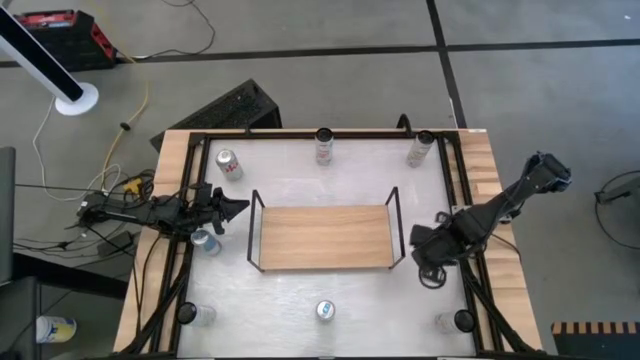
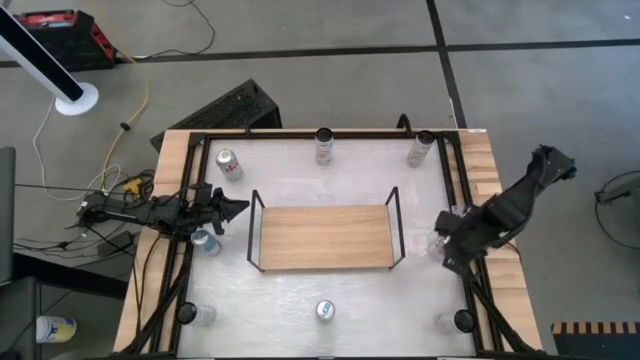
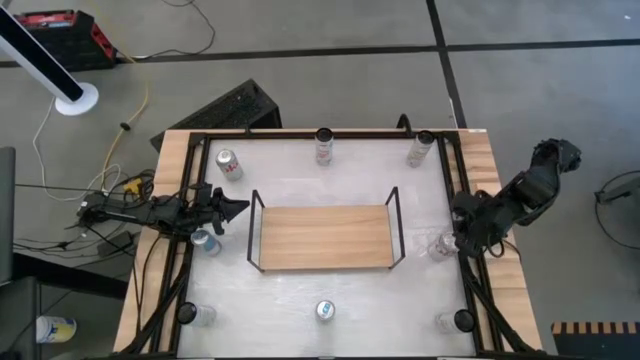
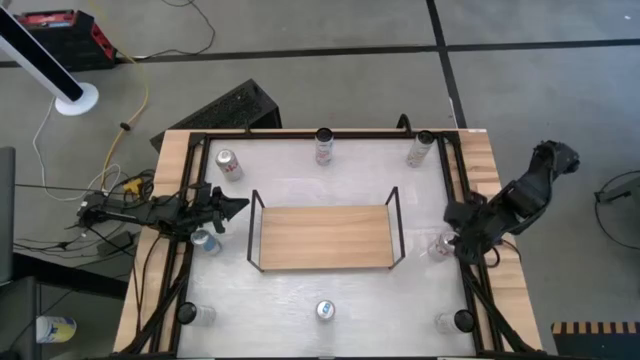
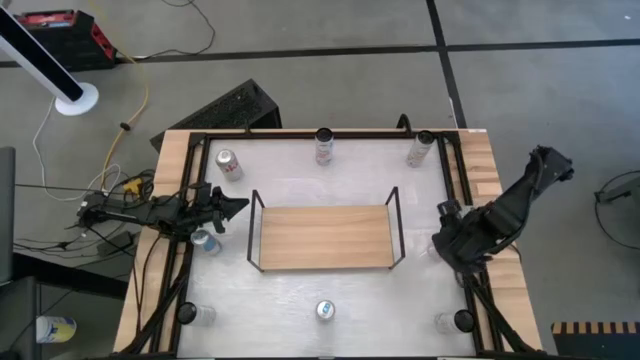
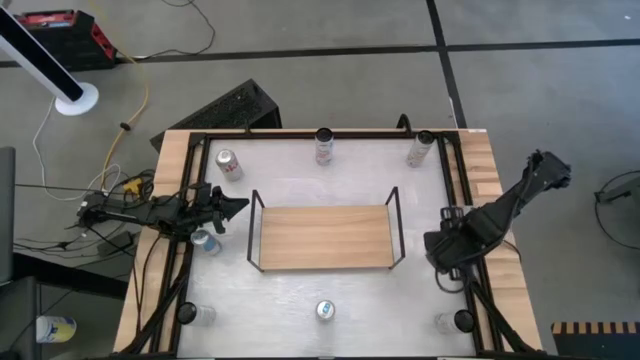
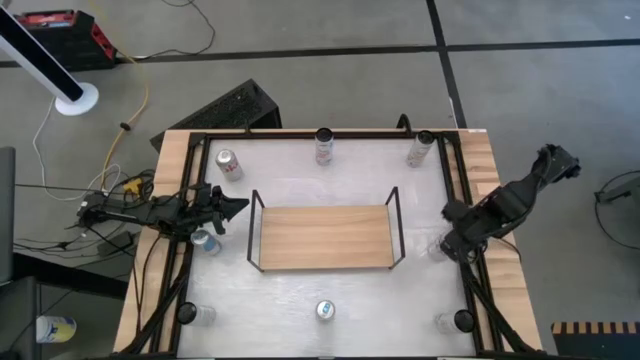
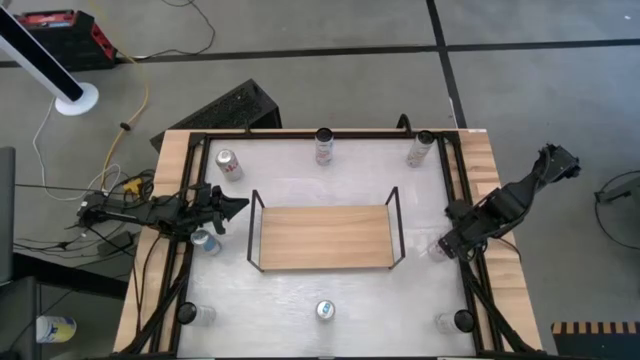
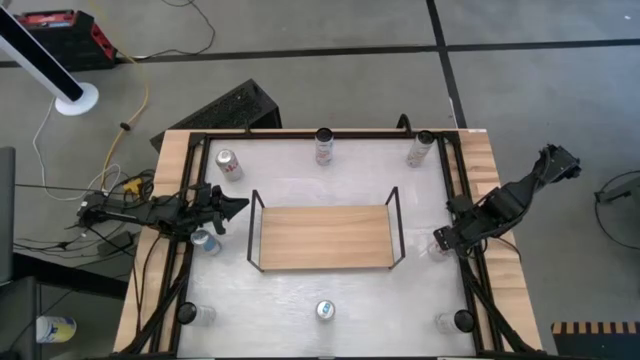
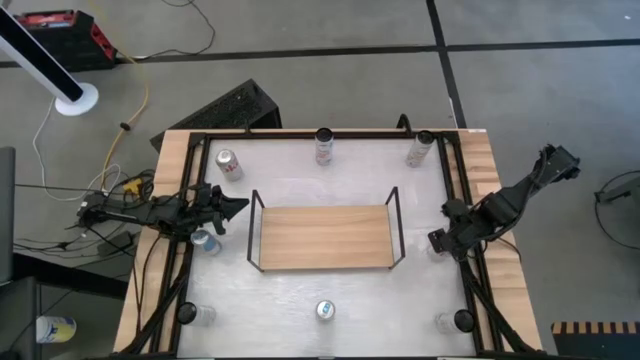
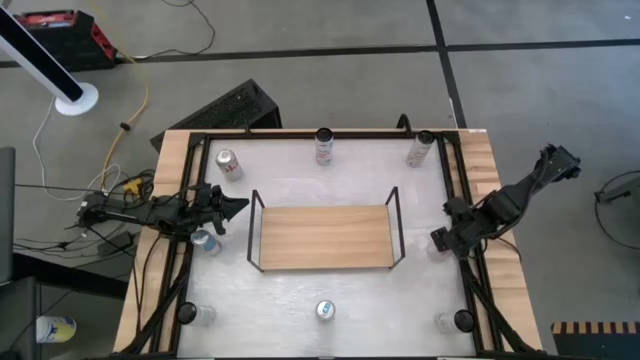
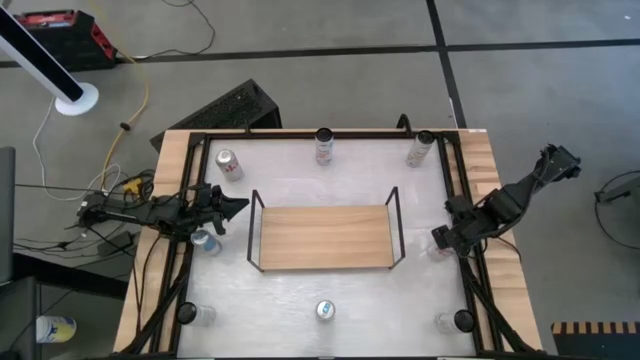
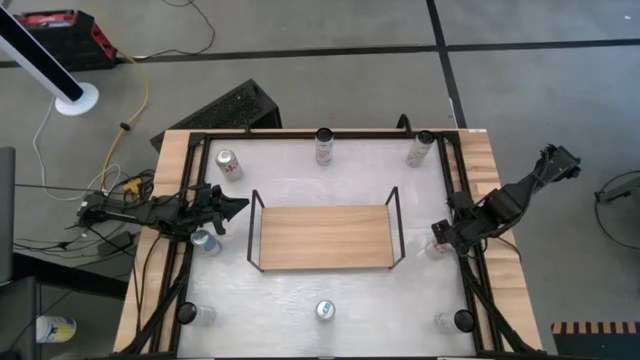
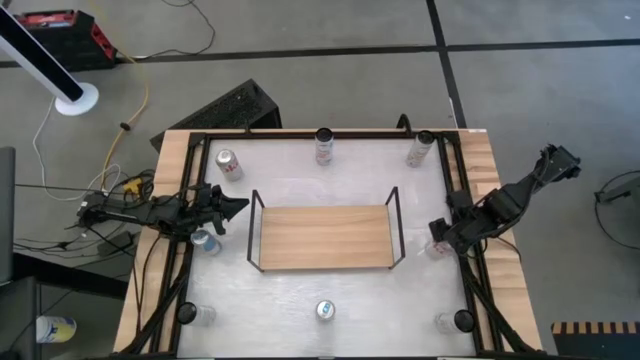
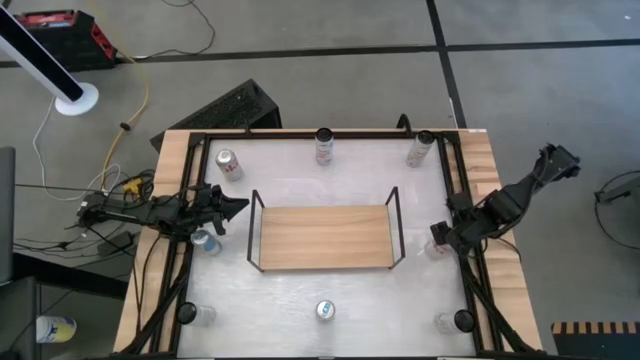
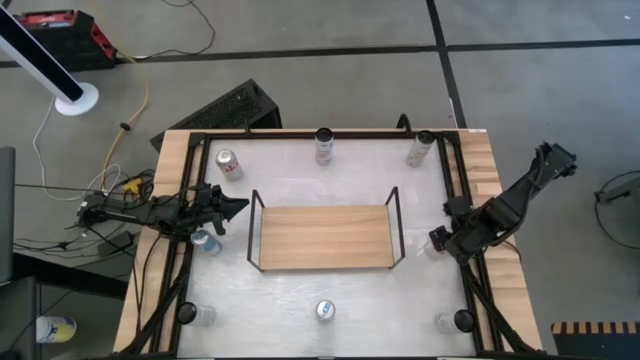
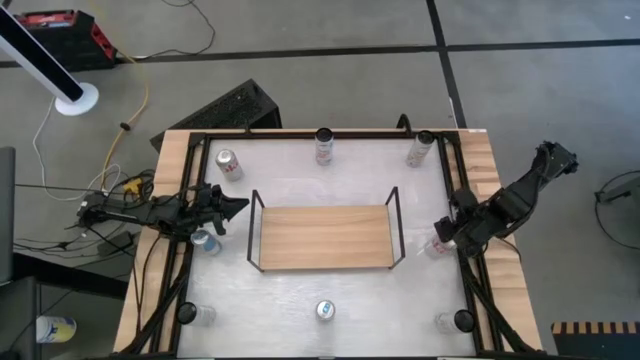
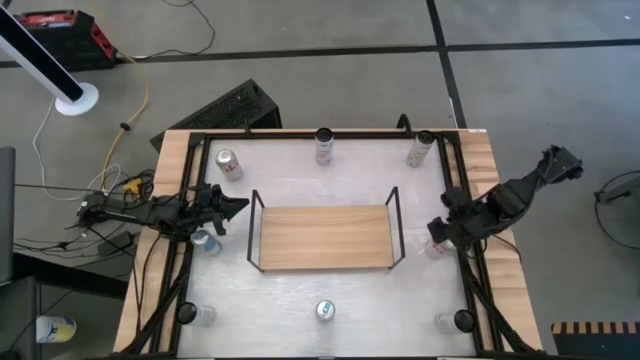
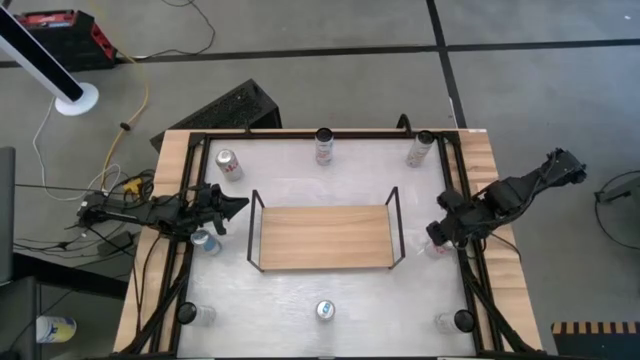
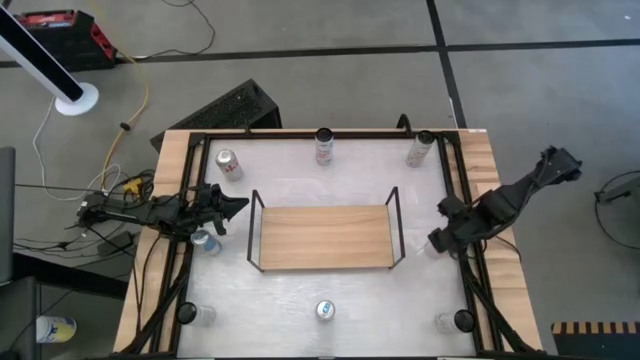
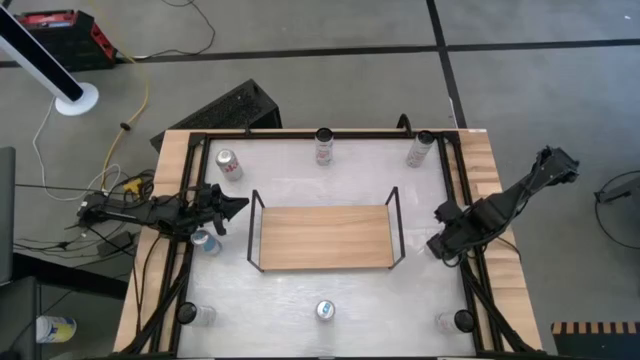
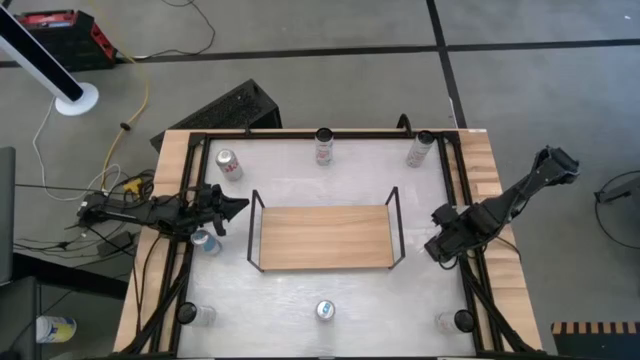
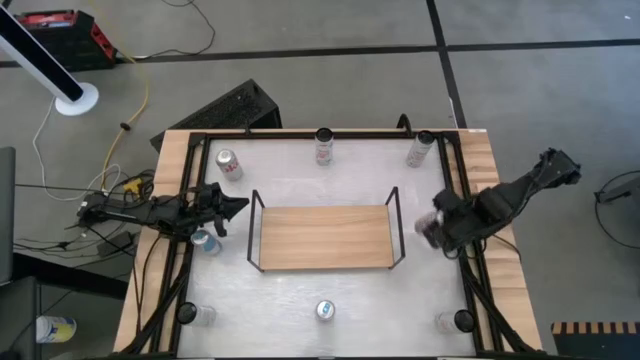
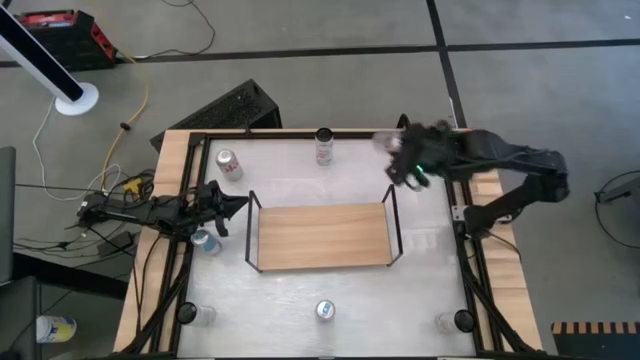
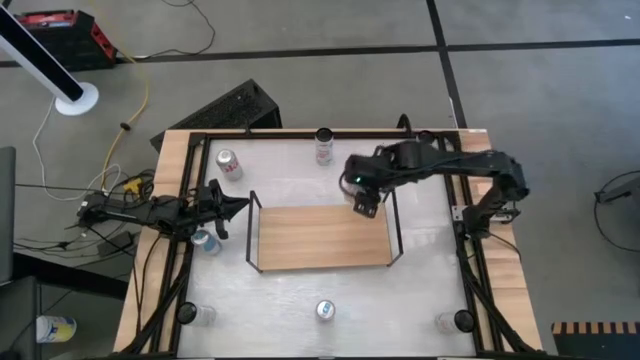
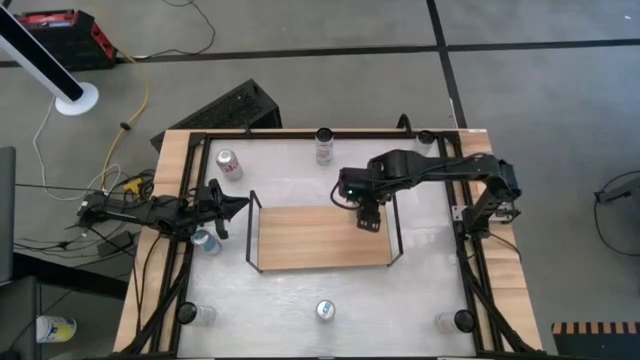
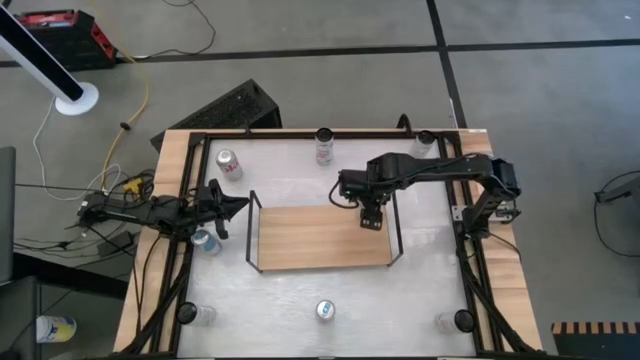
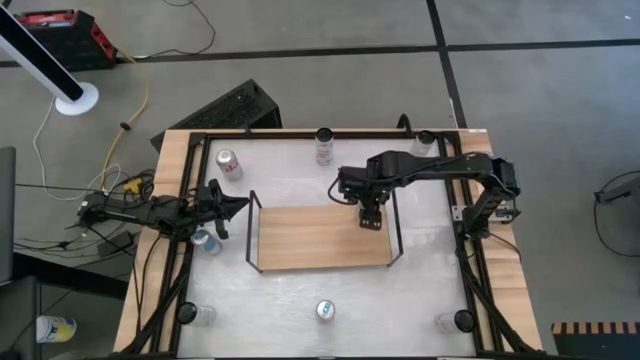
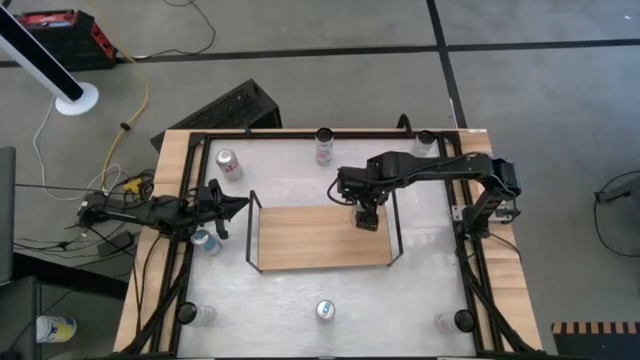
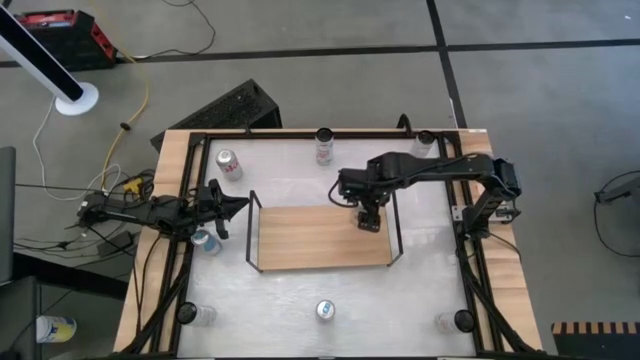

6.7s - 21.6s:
Task: Place canned beverage on shelf
Put the bottom red silver soda can on the shelf

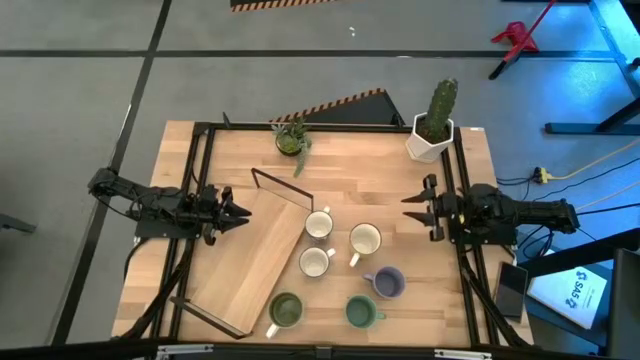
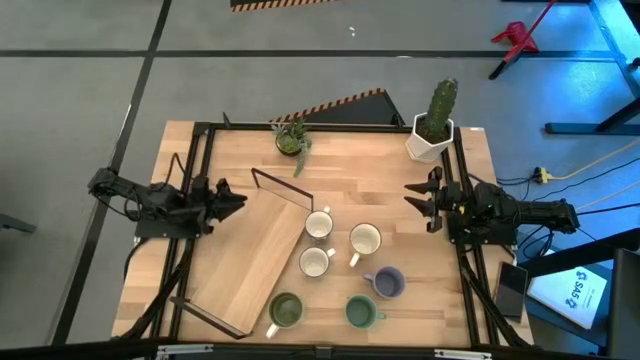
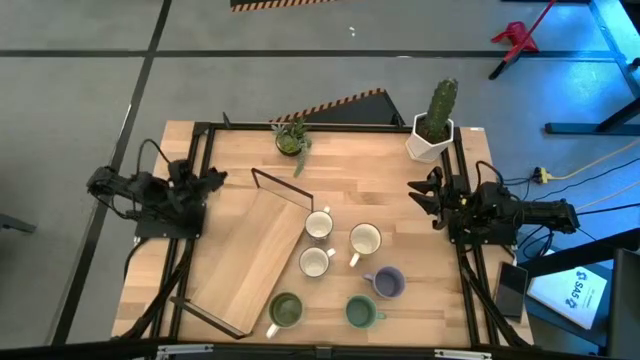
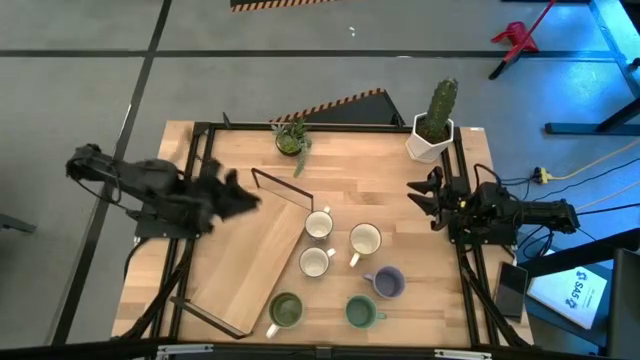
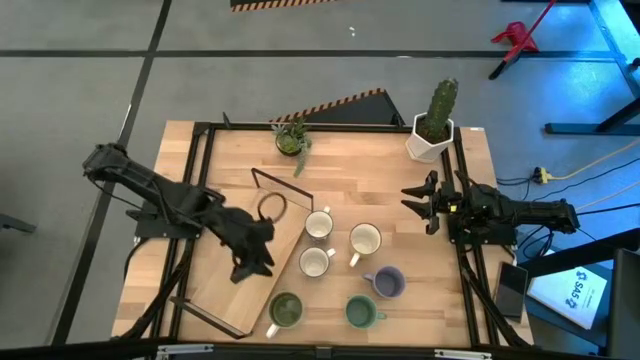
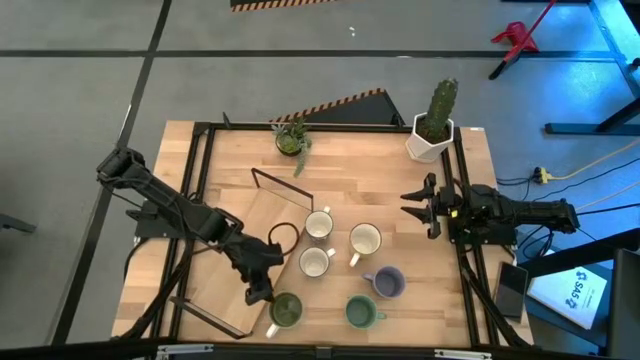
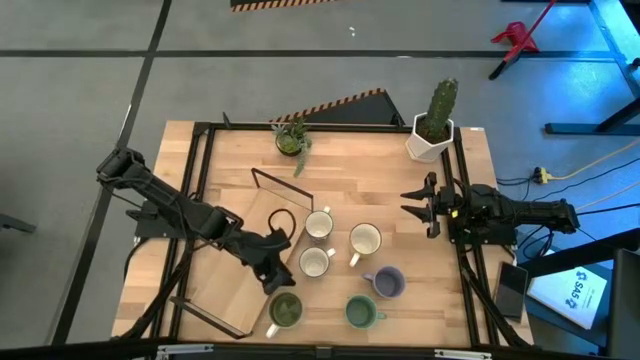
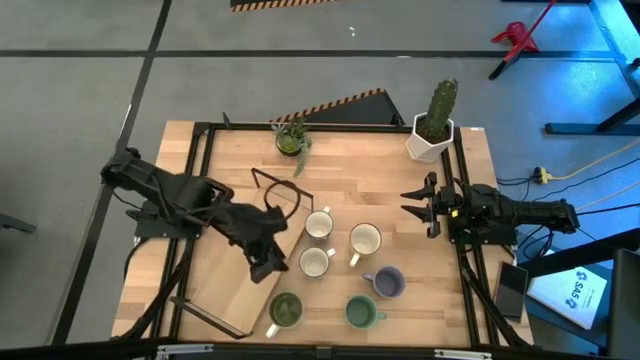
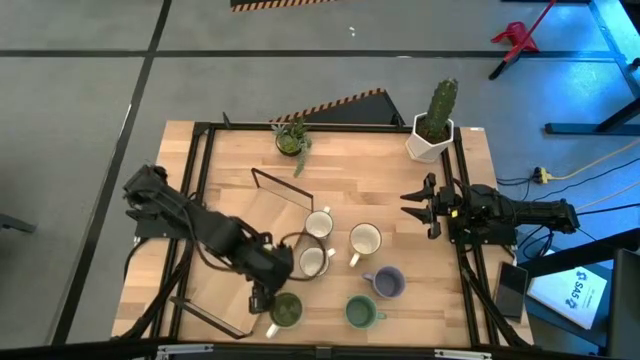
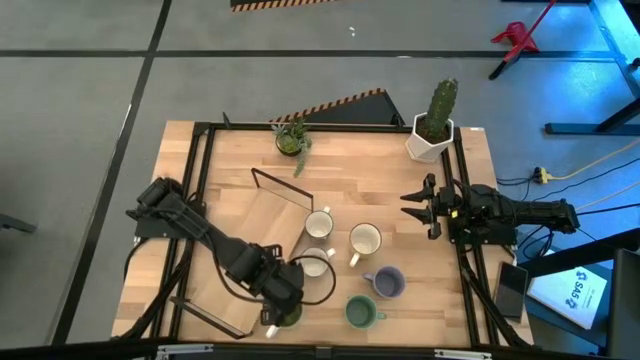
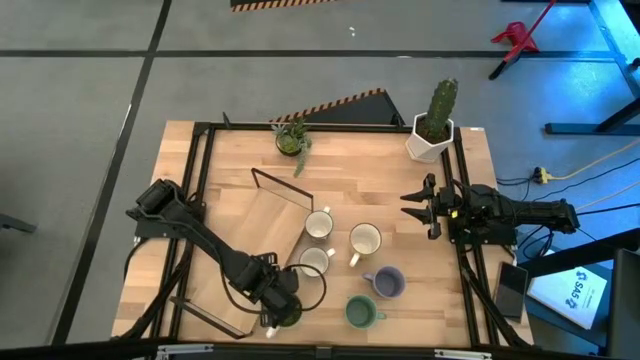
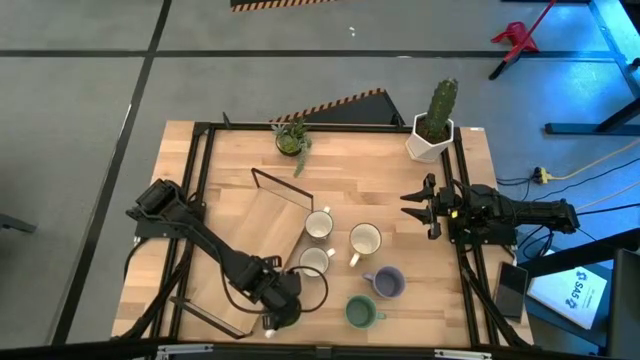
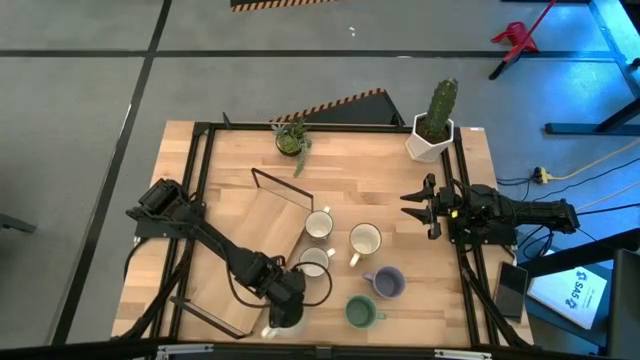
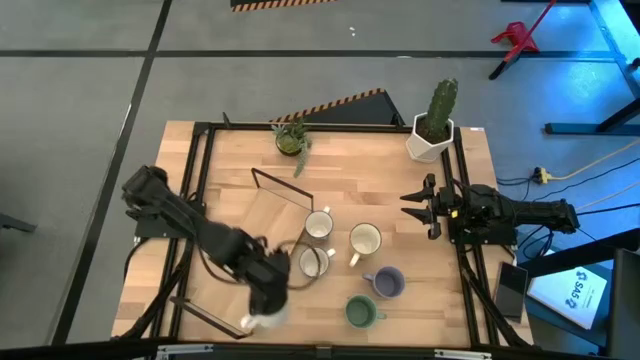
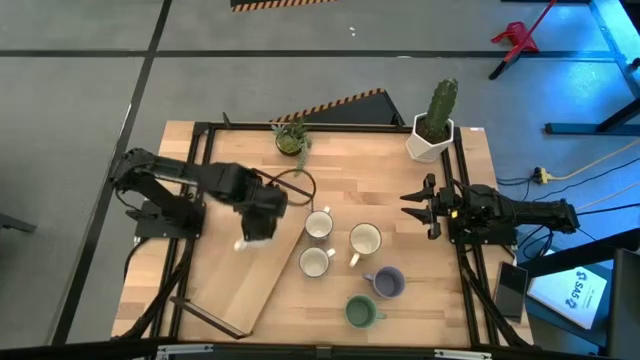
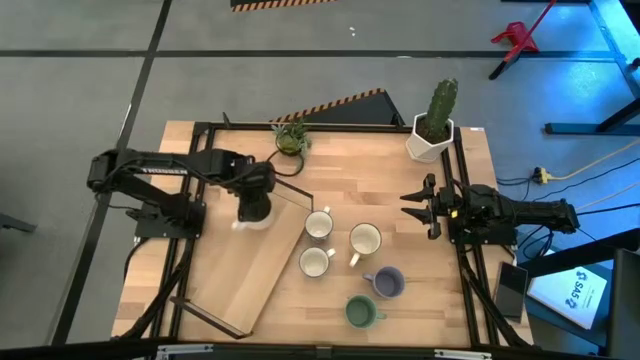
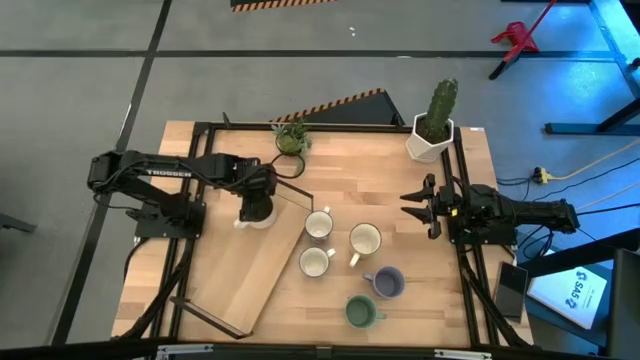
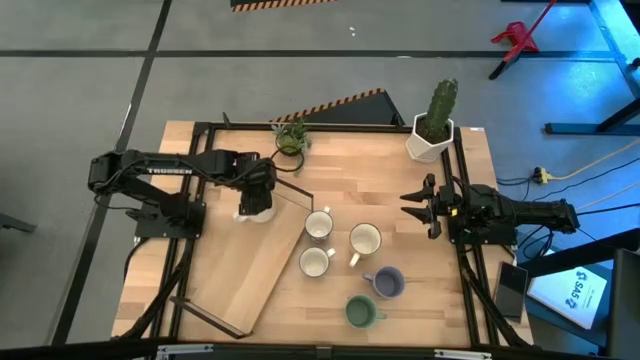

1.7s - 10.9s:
Task: Place coffee mugs
Put the white and green mug on the shelf
